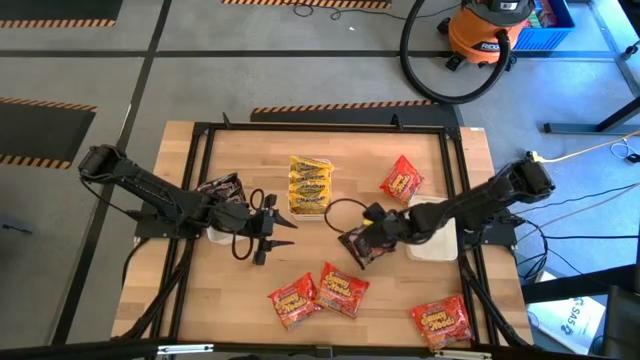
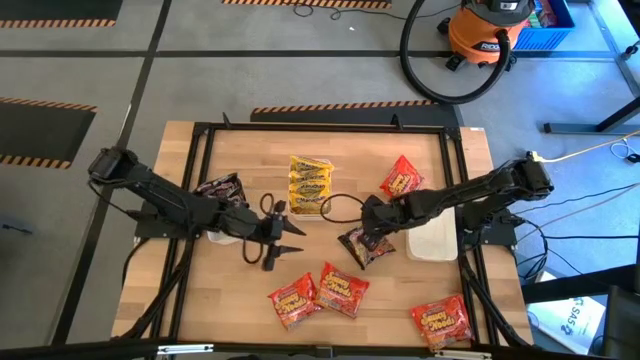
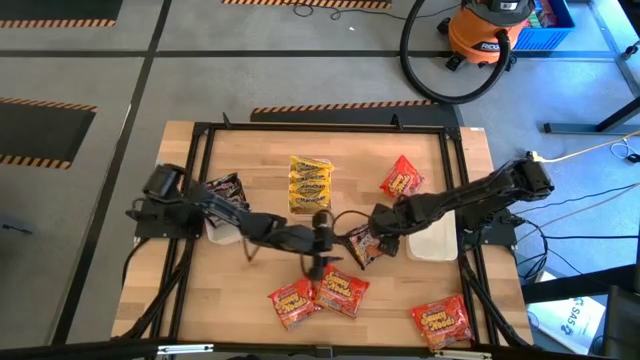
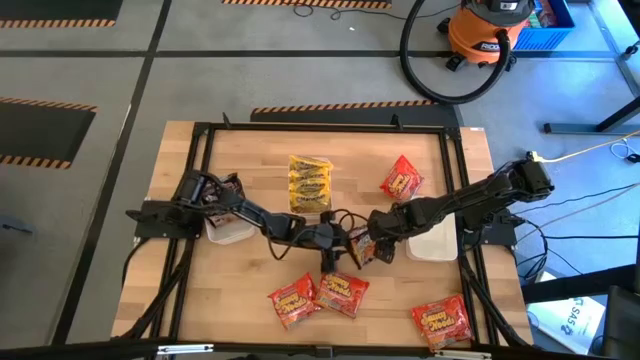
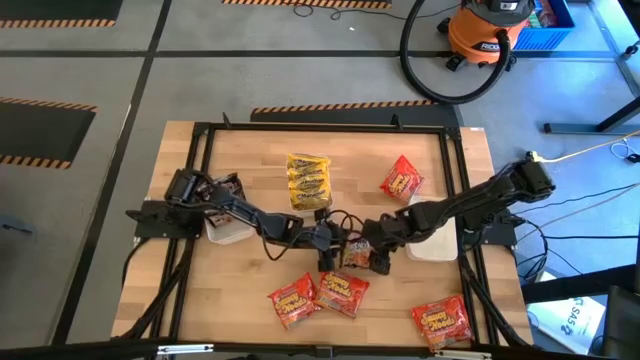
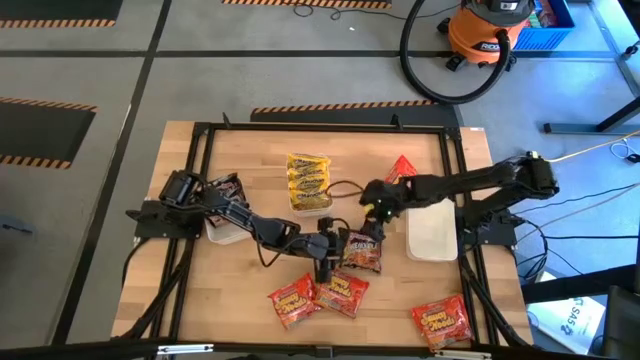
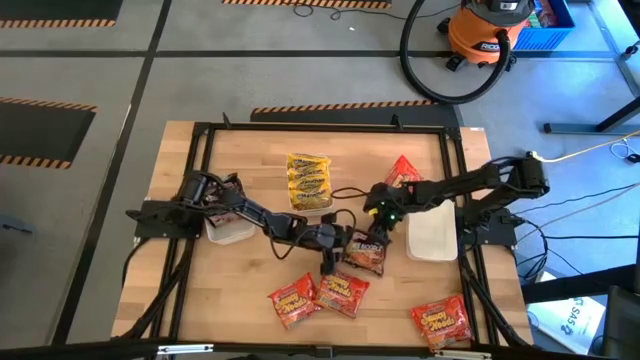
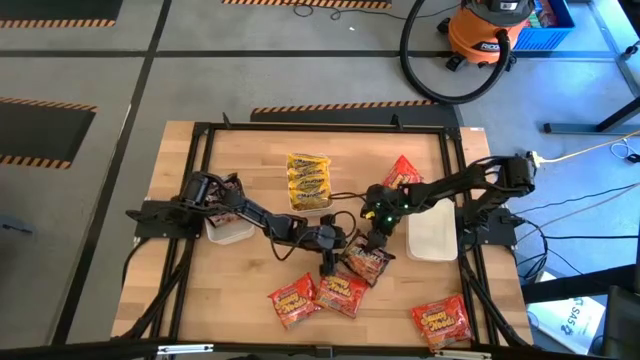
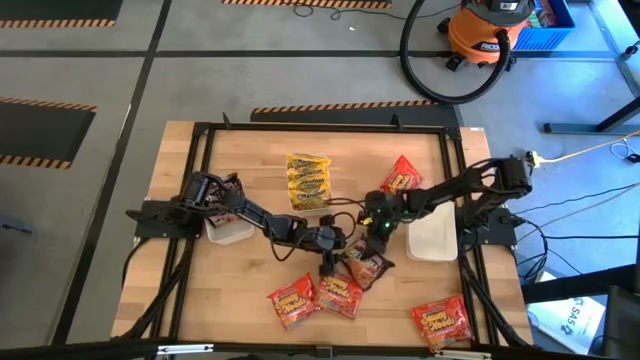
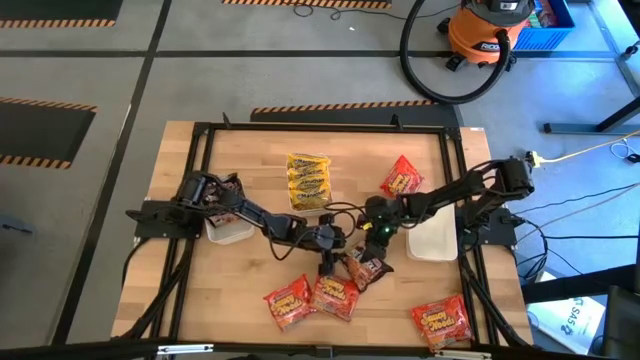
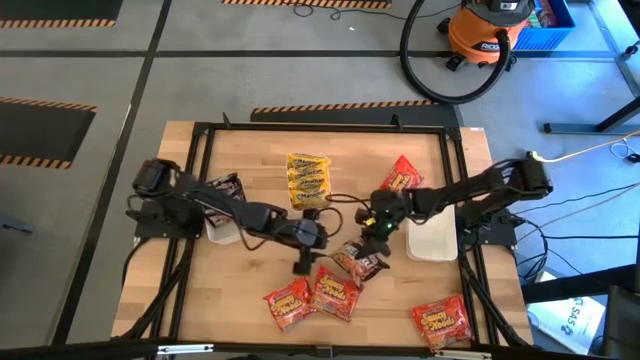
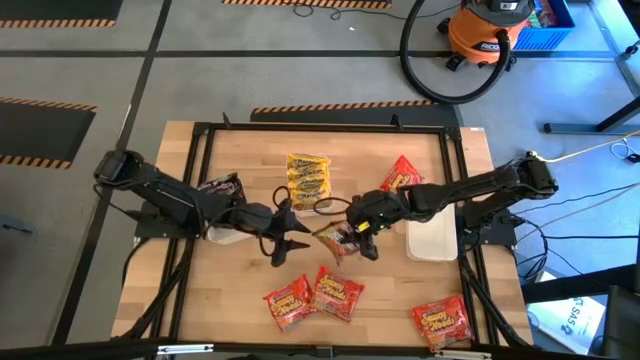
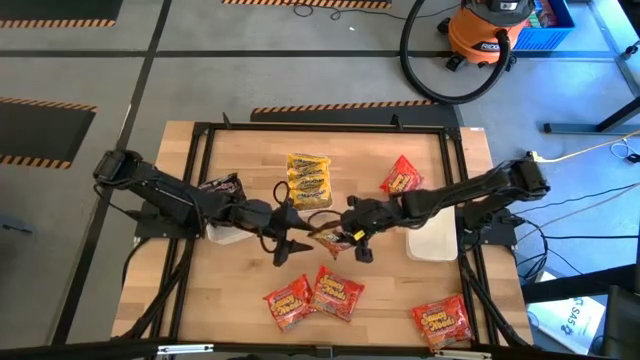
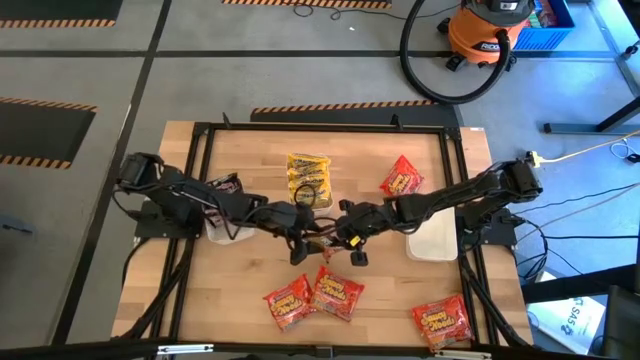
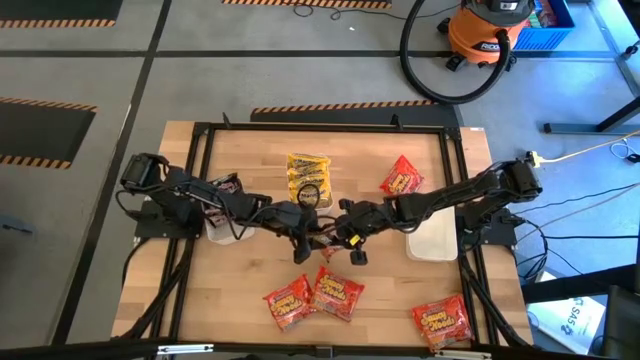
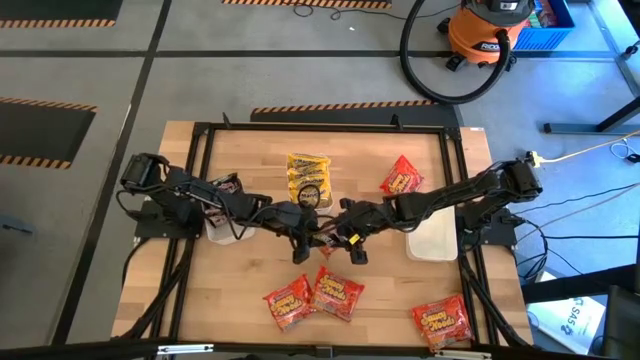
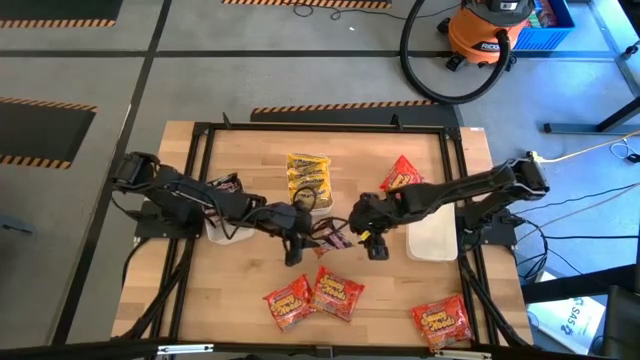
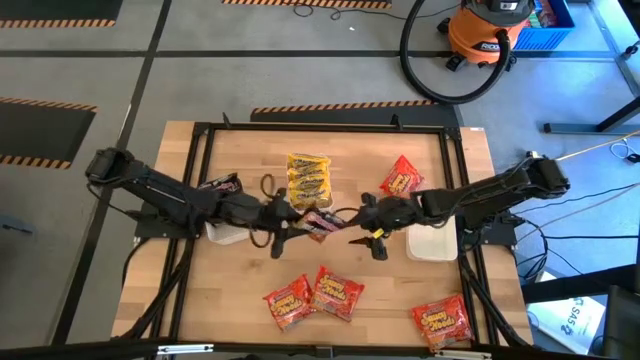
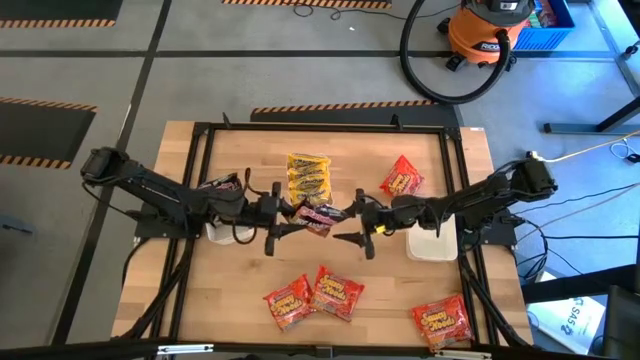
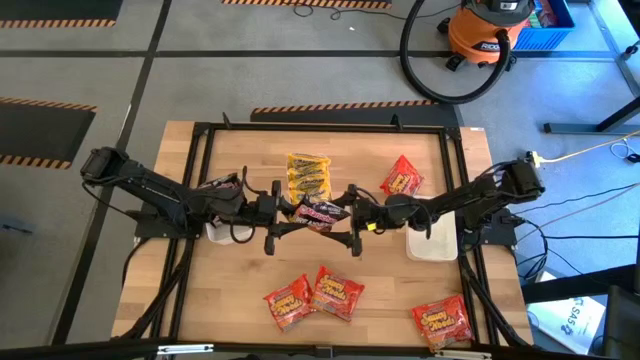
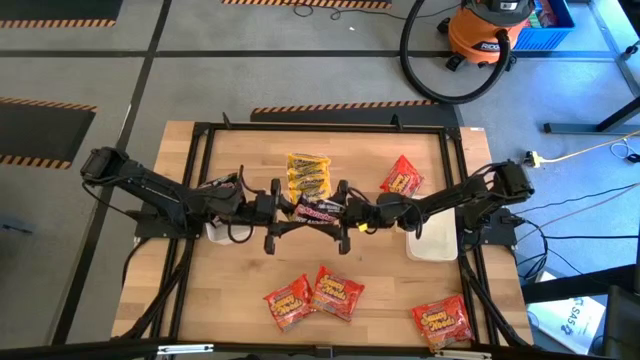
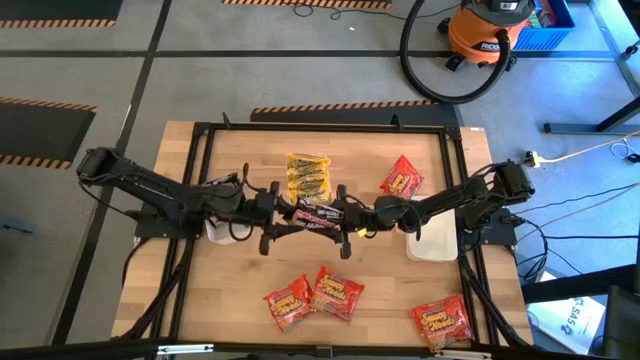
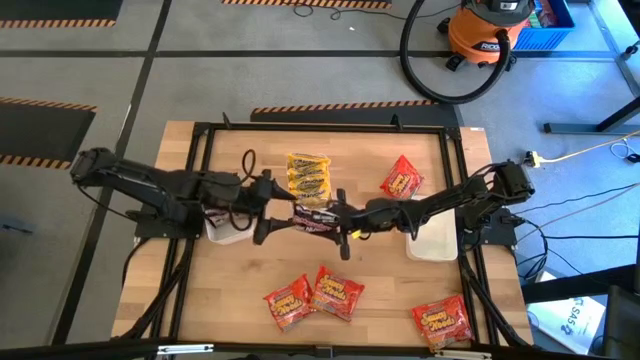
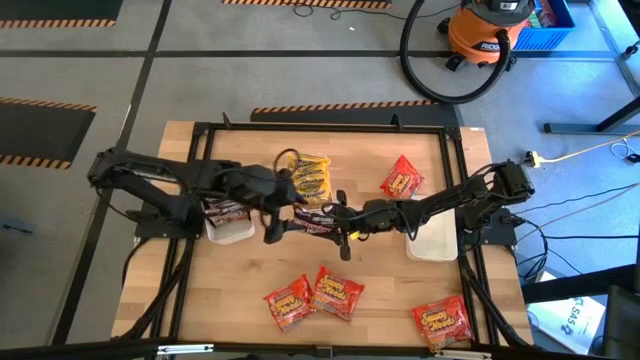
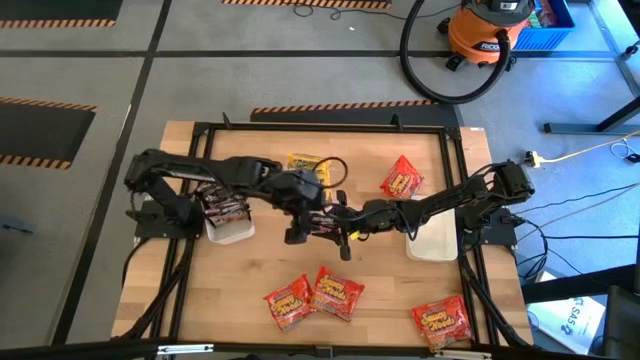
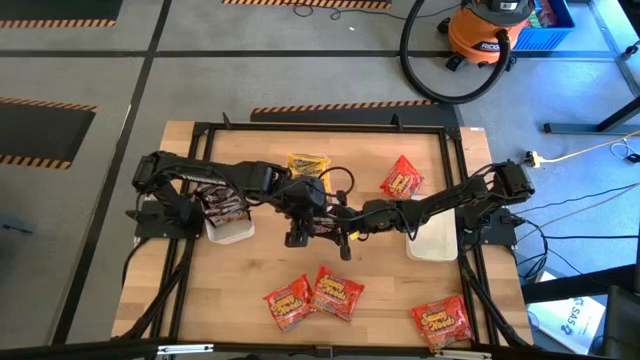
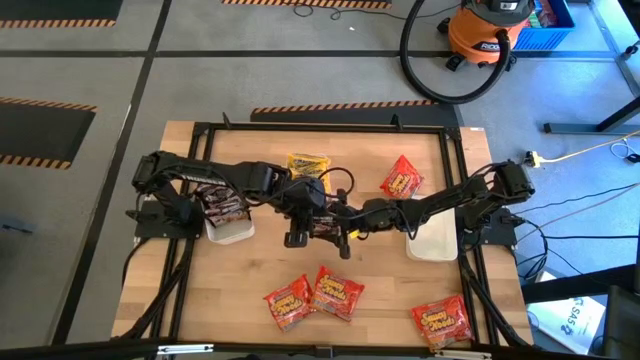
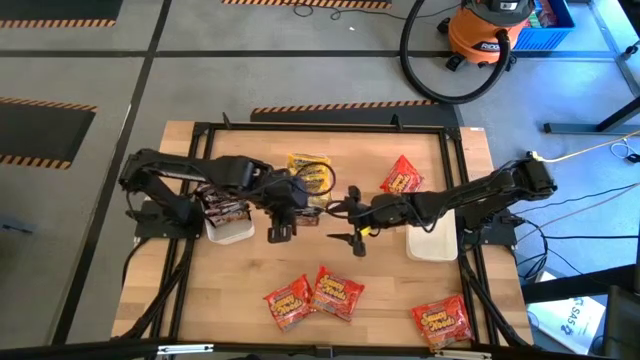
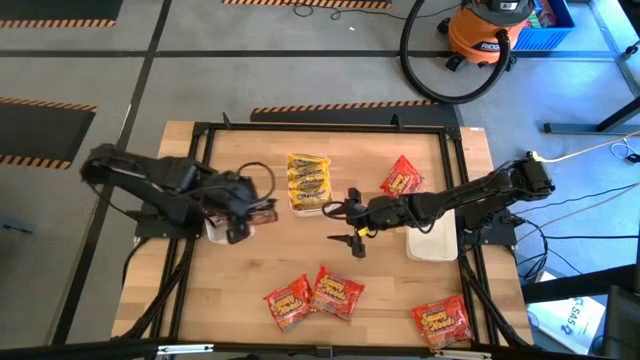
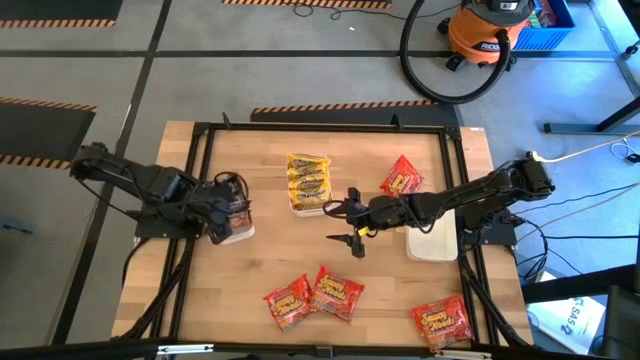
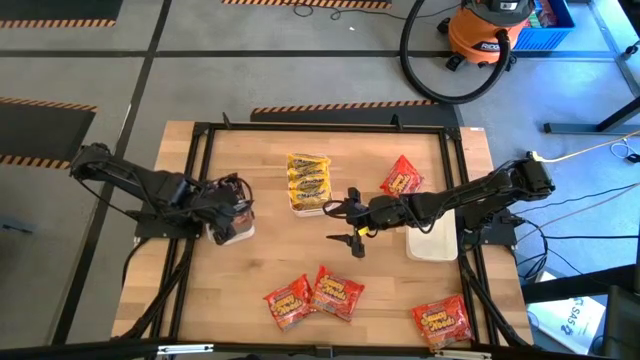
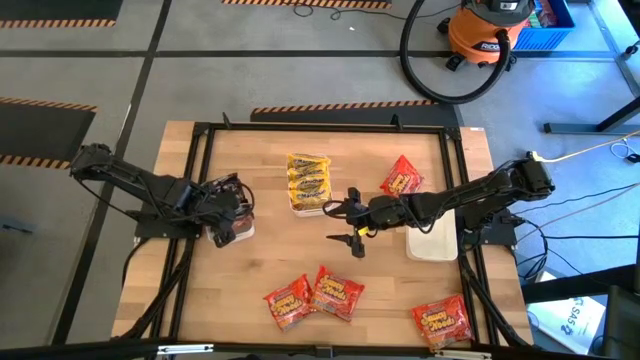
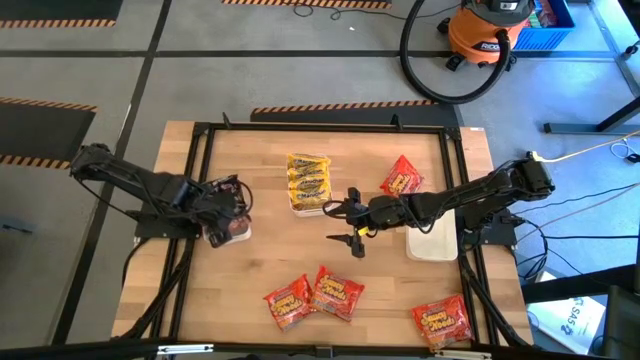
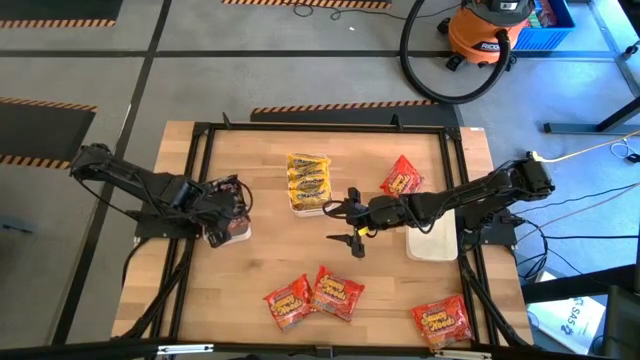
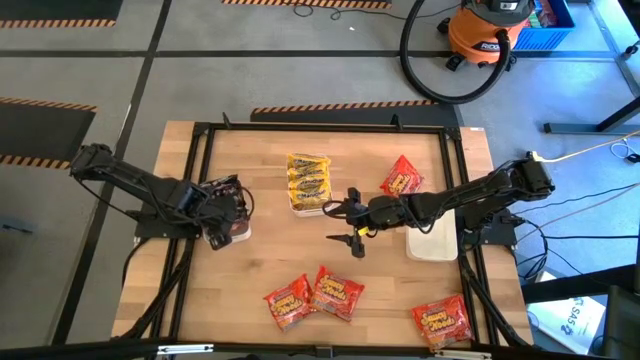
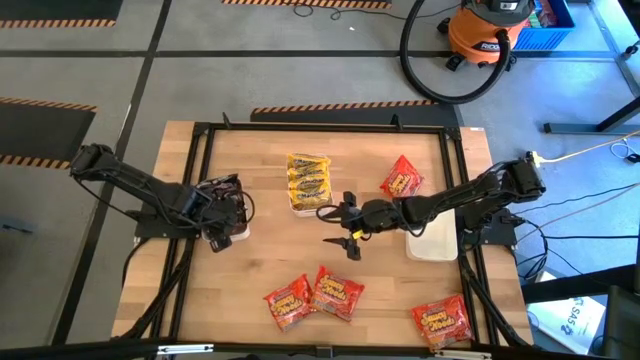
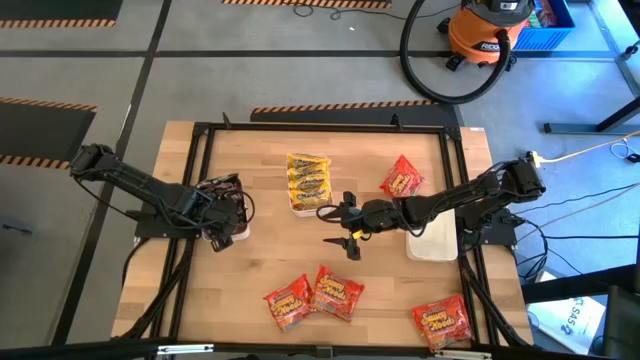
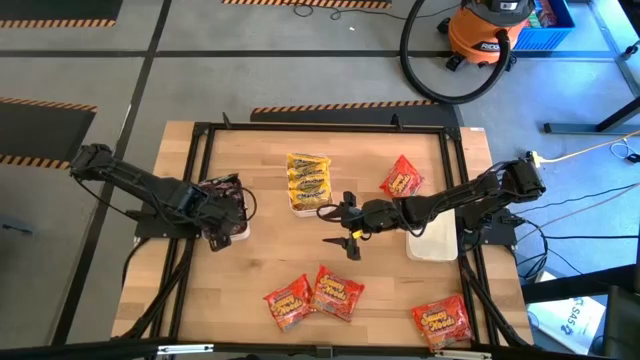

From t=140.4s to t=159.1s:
Task: Sort Maruchan noodles
Put the black noodle pack into the left white bin

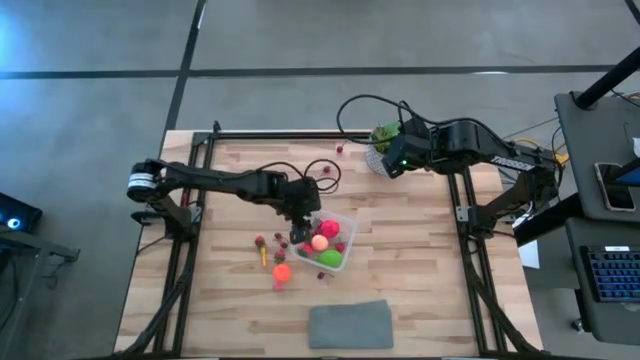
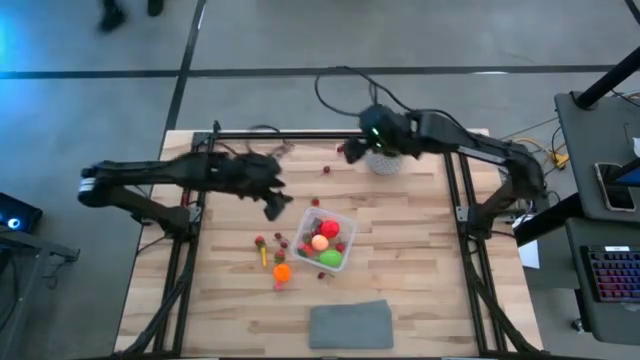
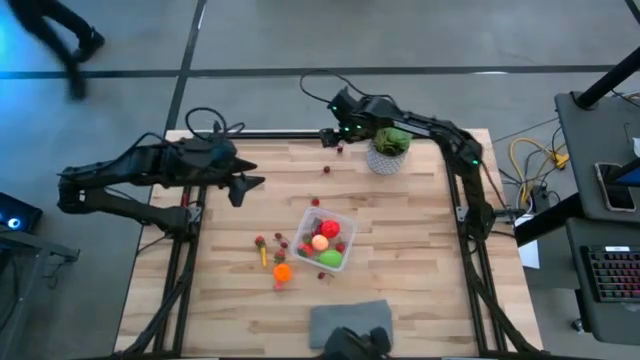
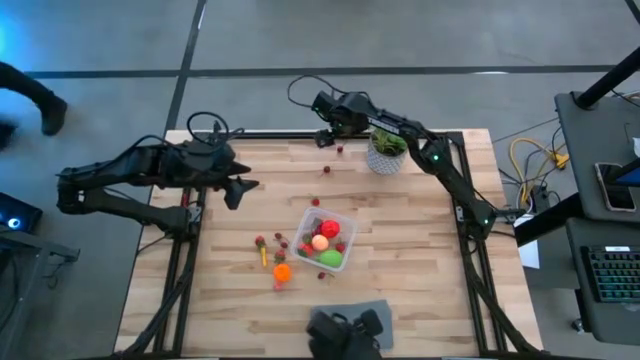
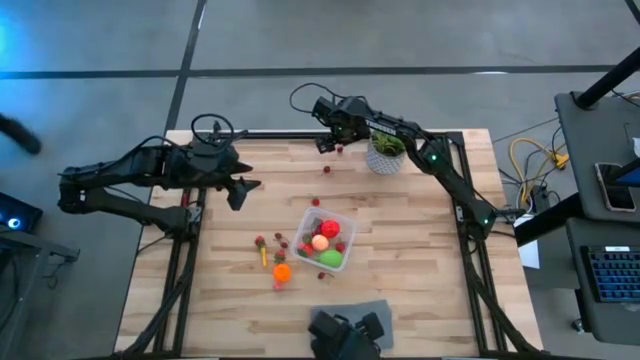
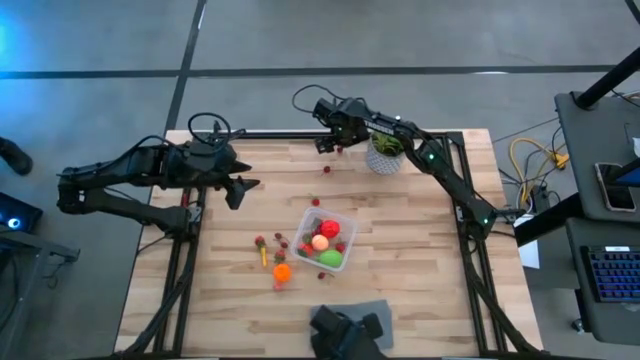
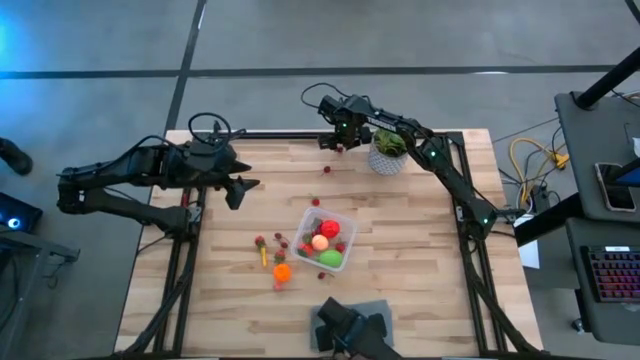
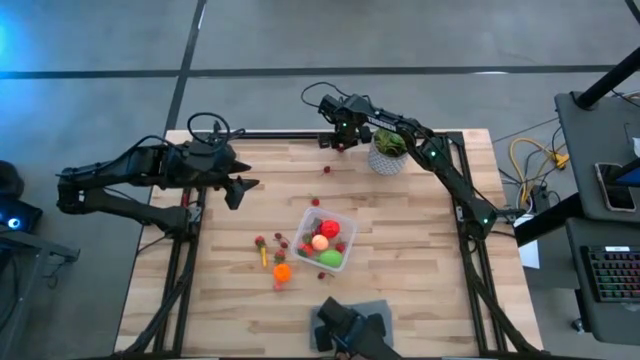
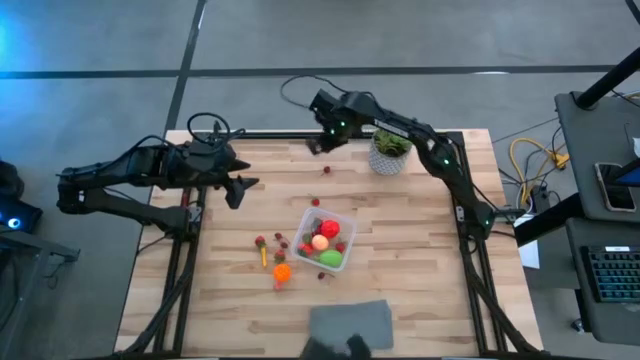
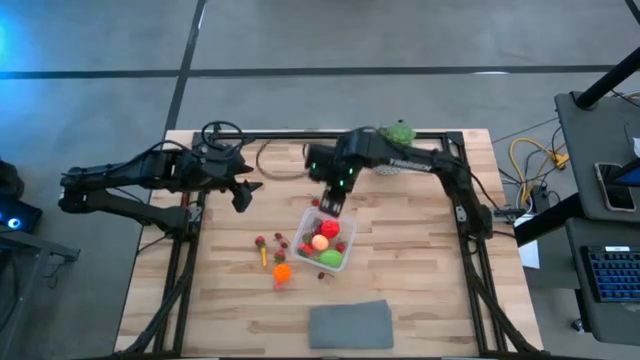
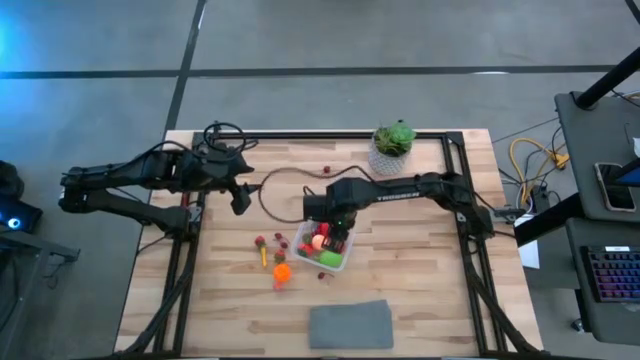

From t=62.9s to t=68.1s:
Task: Pick and placing Produce into tupperware
Put the red cherry into the transparent container
